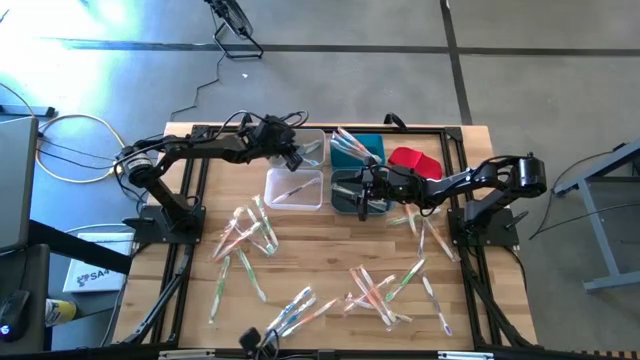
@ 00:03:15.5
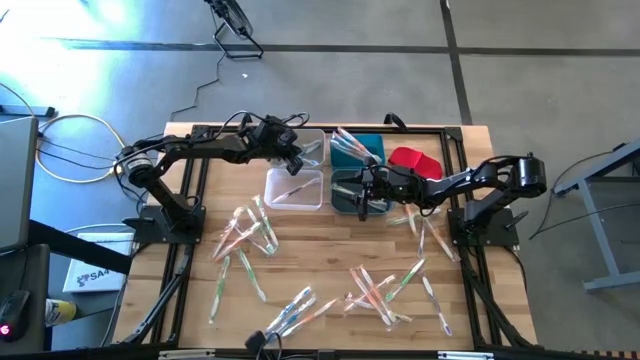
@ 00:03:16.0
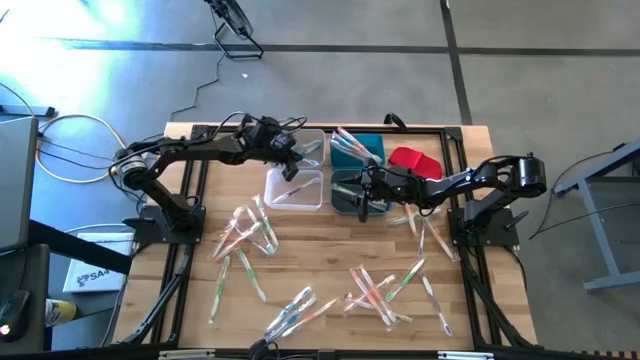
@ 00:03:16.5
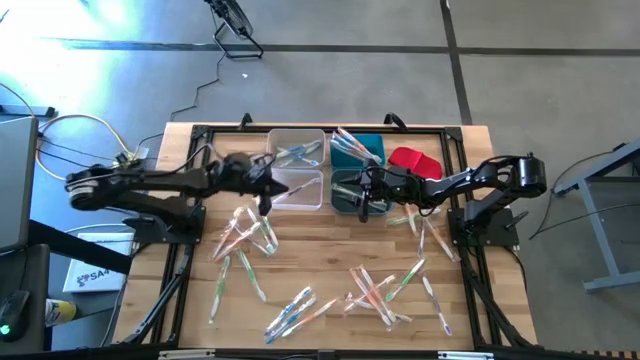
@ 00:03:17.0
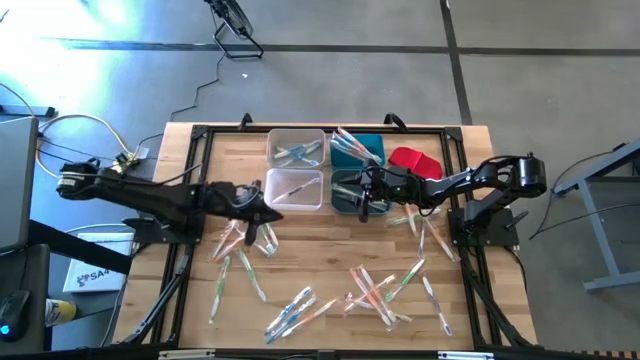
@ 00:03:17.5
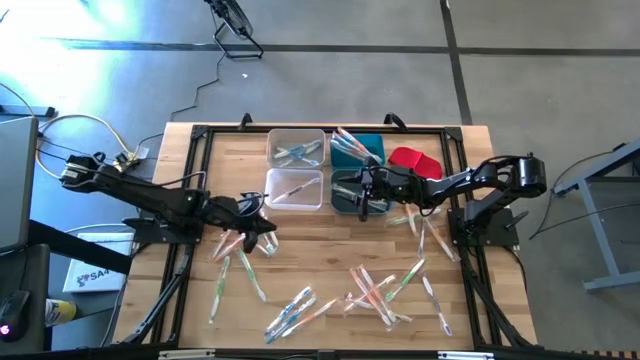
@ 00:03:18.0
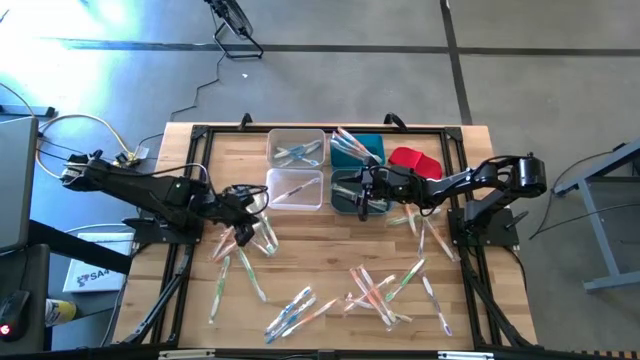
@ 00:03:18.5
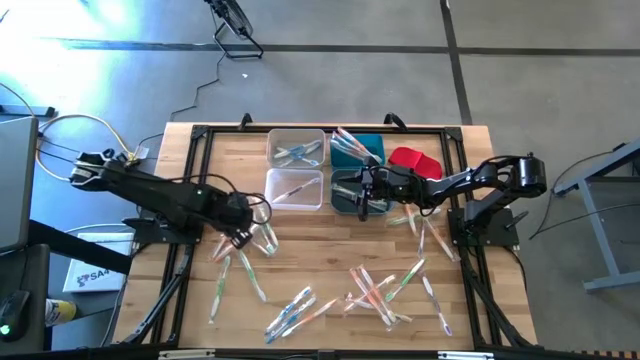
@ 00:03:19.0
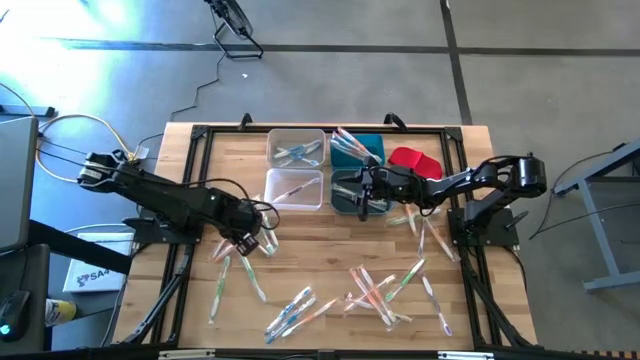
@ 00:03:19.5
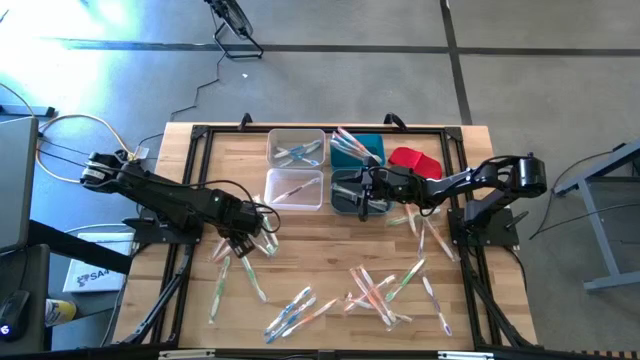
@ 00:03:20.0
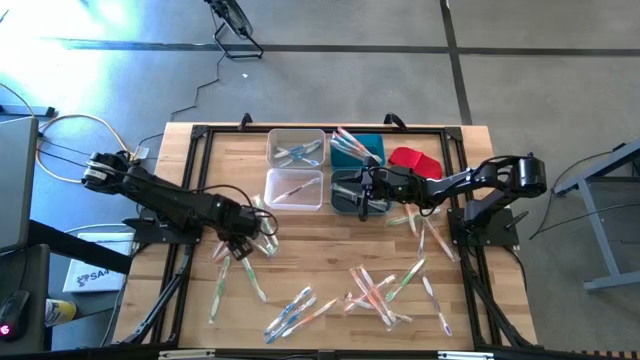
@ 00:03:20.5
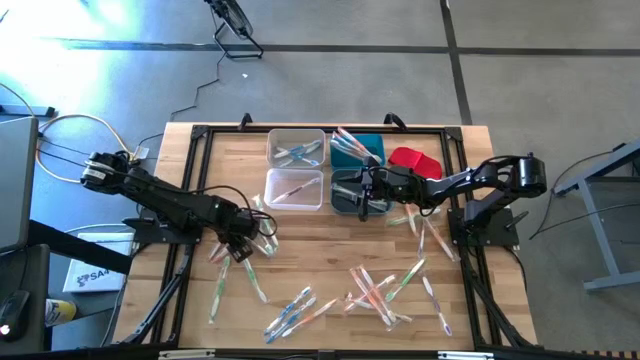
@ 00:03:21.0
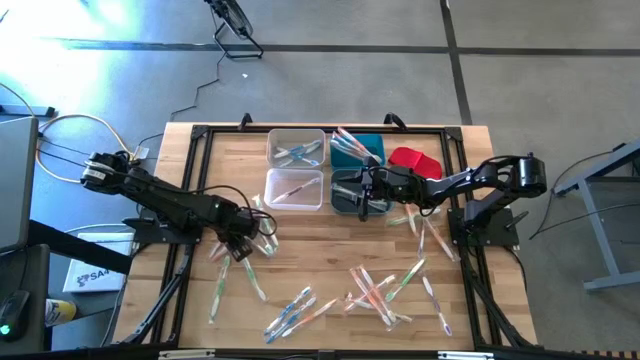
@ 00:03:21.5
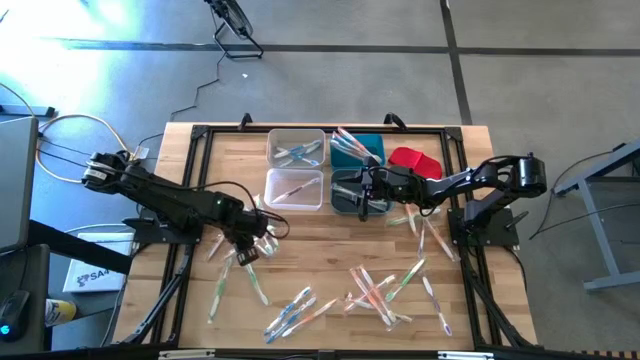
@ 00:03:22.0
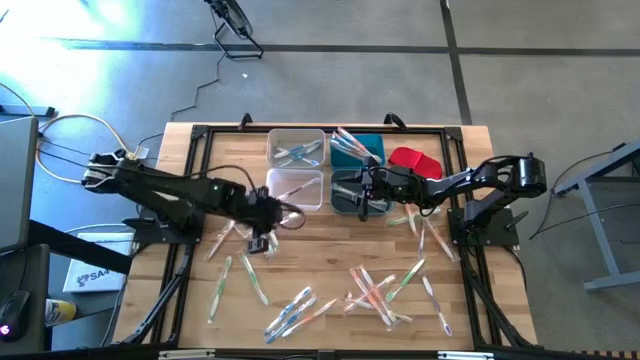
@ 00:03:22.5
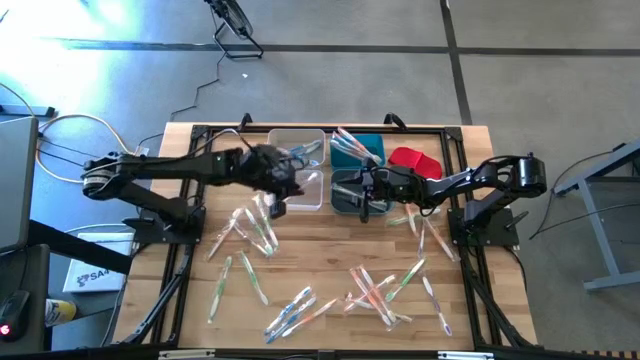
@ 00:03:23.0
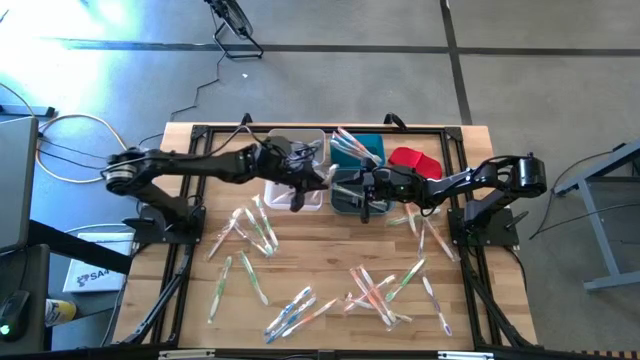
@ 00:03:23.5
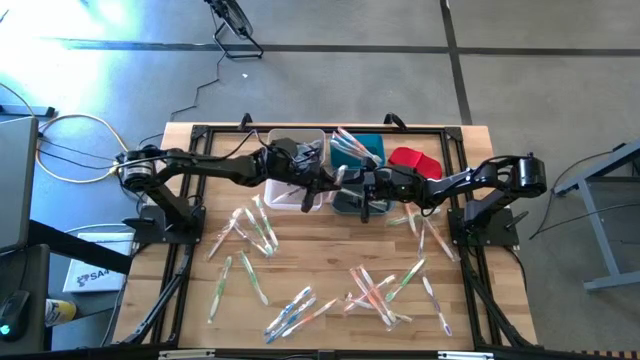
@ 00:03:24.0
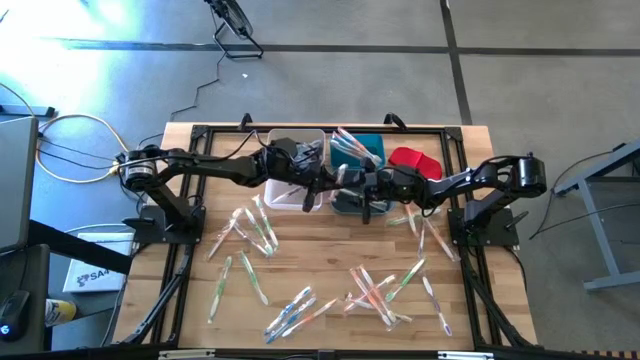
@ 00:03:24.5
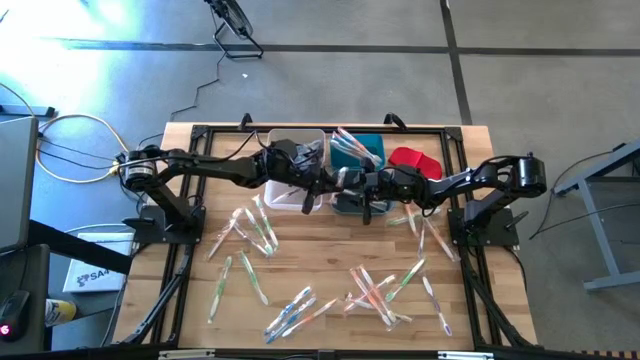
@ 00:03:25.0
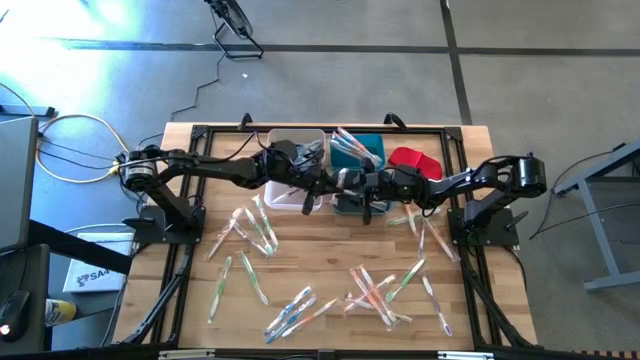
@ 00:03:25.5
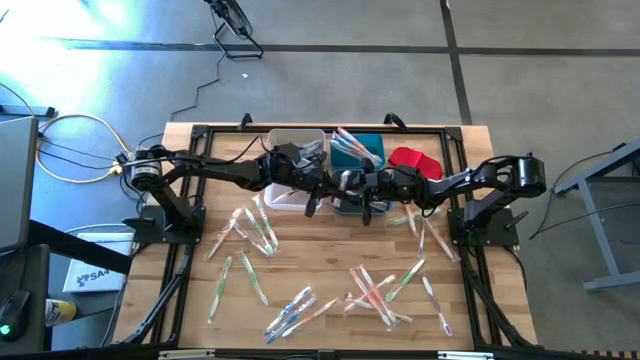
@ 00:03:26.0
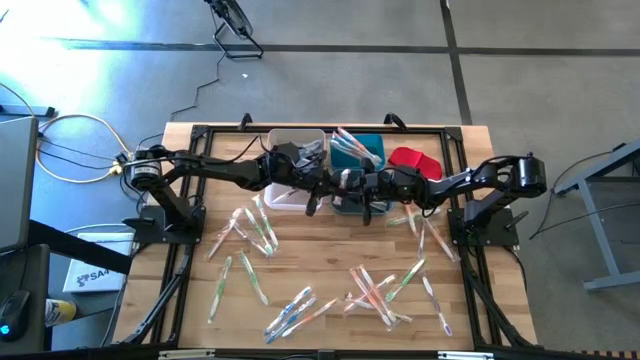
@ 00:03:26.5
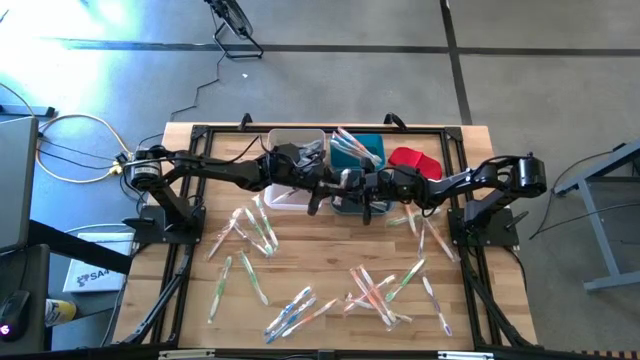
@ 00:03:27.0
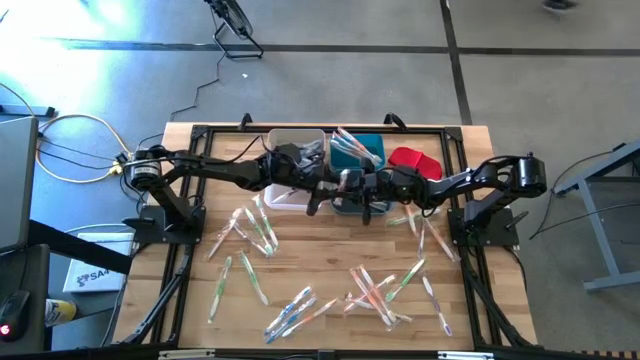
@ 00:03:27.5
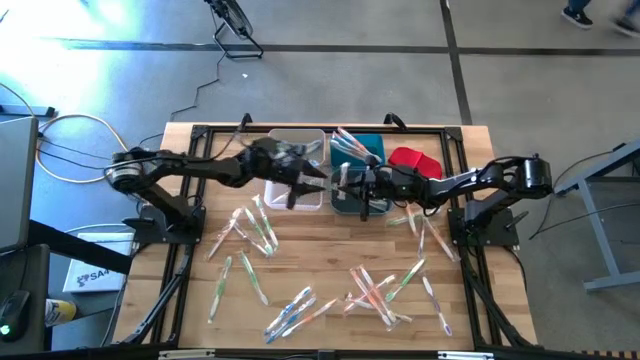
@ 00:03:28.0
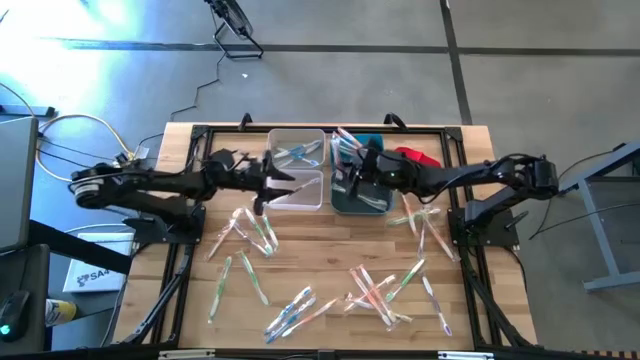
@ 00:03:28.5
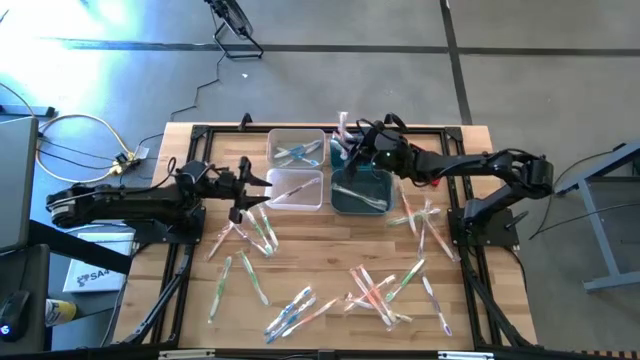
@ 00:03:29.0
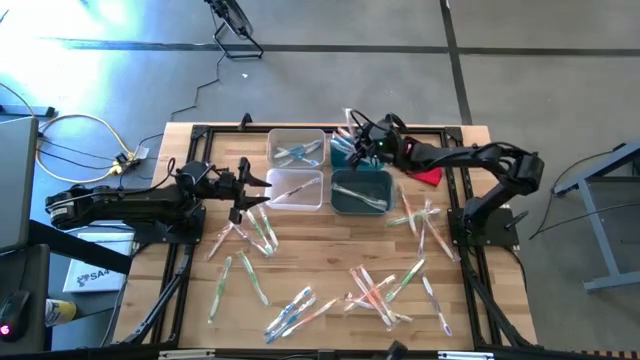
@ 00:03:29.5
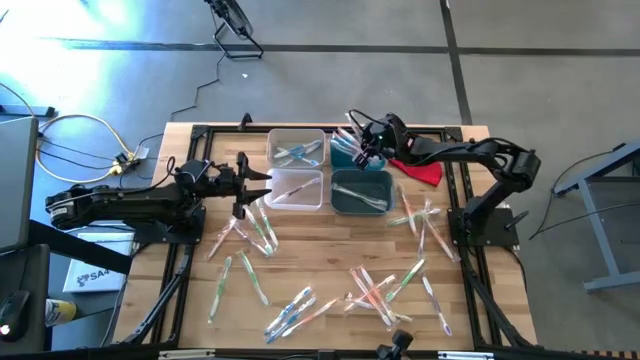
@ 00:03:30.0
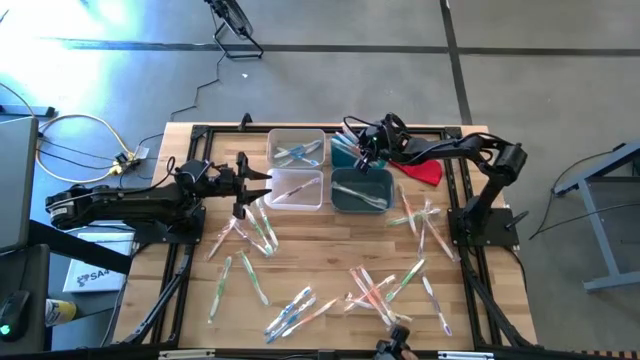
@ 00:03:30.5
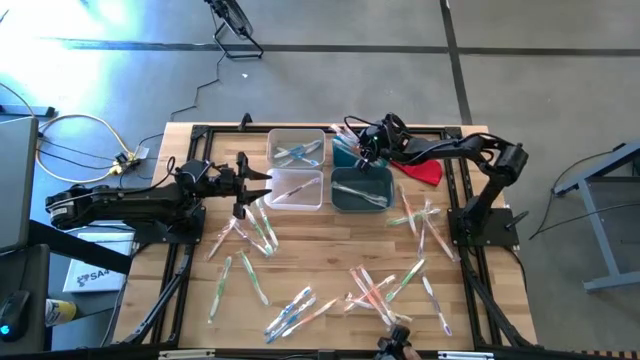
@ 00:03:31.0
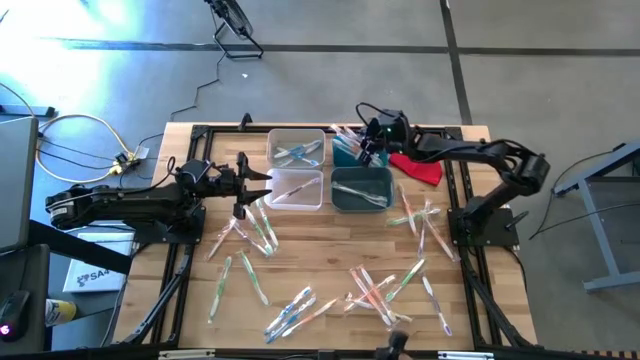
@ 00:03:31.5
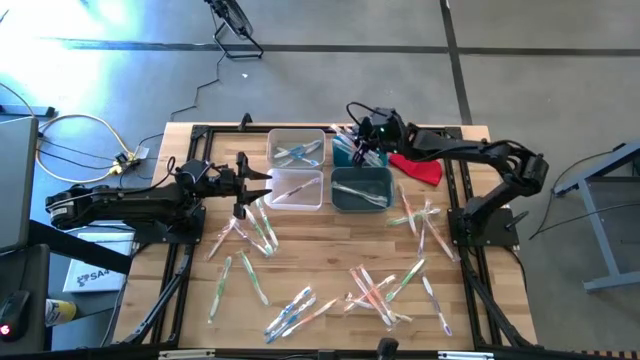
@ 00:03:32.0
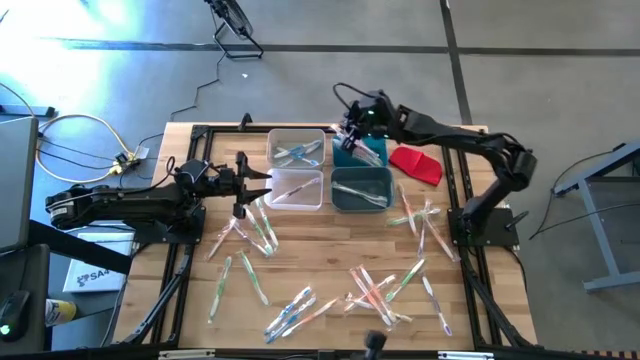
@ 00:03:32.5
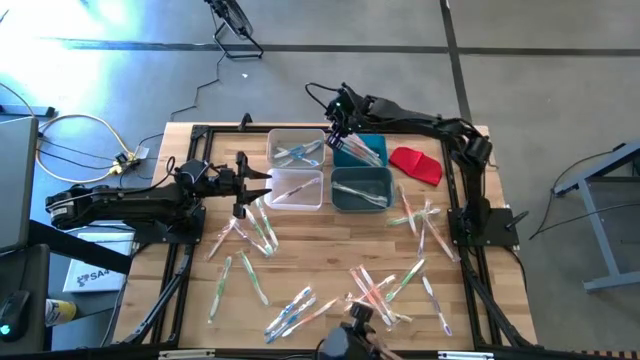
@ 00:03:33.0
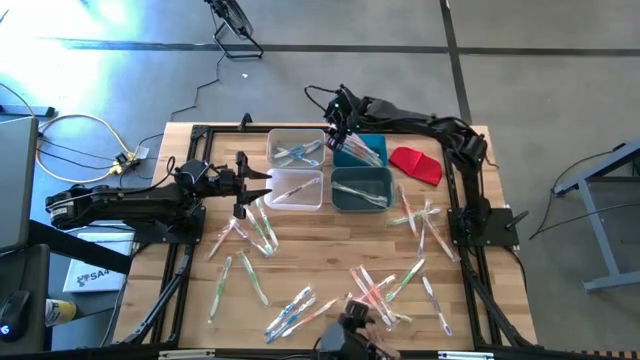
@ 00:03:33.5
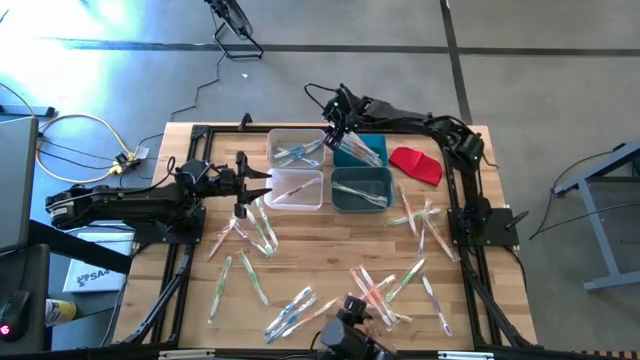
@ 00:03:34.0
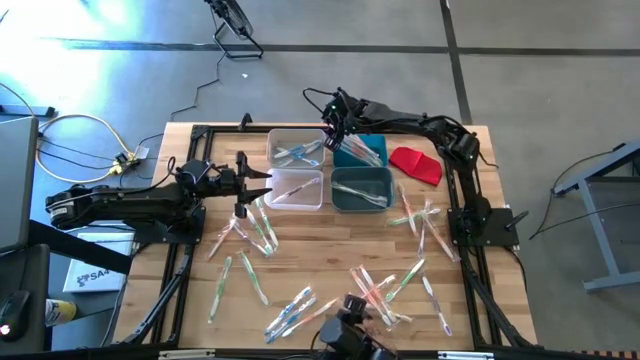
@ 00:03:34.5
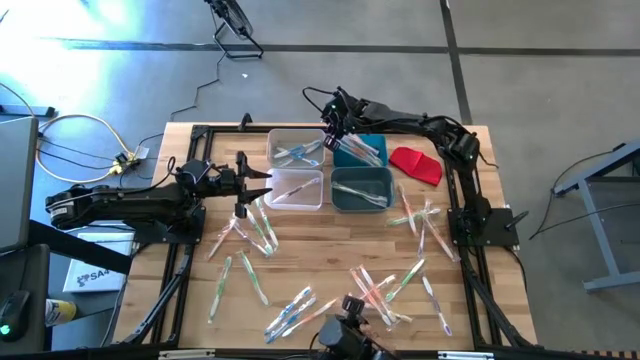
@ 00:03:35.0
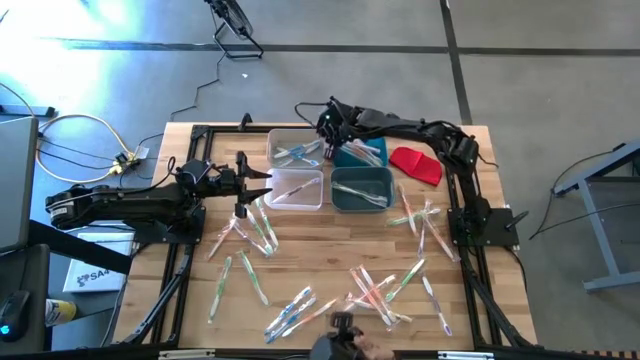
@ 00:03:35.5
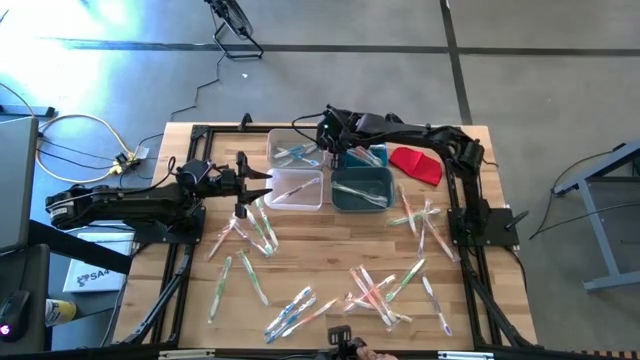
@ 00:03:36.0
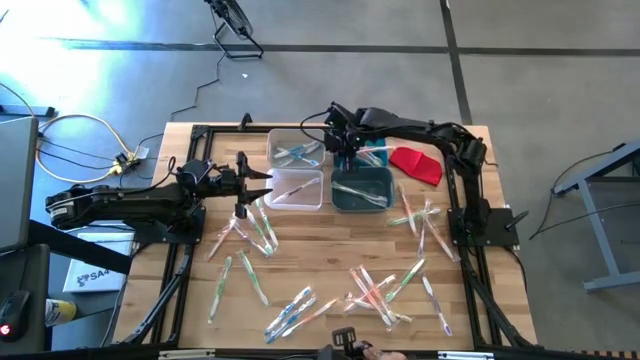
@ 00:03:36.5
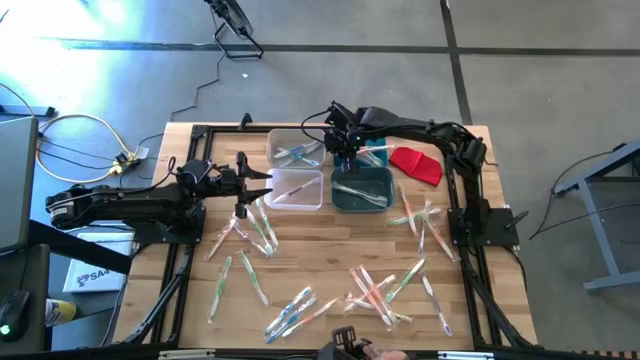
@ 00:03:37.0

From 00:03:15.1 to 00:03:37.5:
Task: Pick & Place Toothbrushes
Put the orange toothbrush into the blue bin
